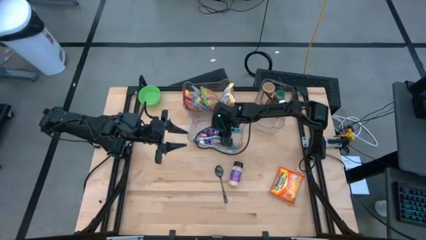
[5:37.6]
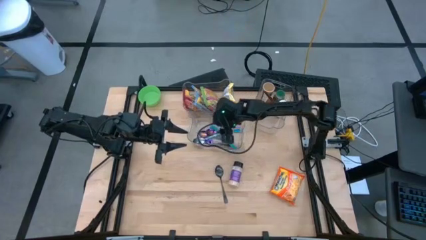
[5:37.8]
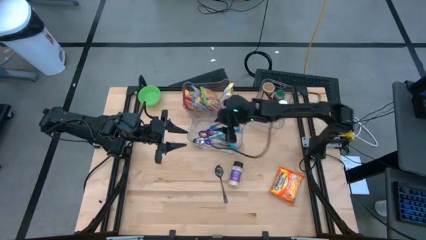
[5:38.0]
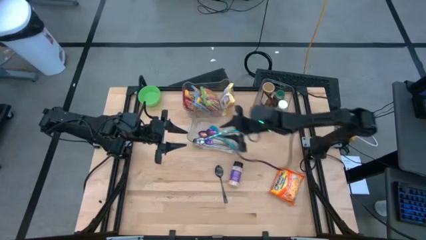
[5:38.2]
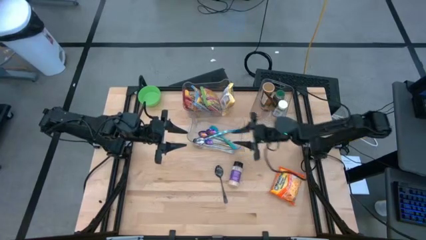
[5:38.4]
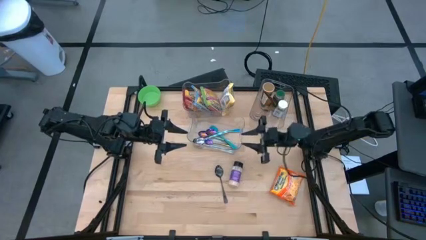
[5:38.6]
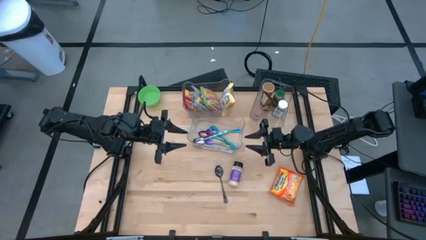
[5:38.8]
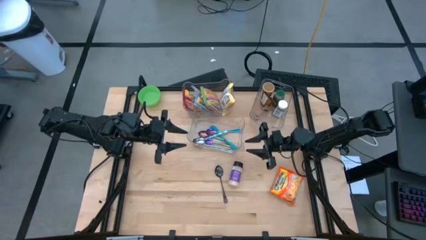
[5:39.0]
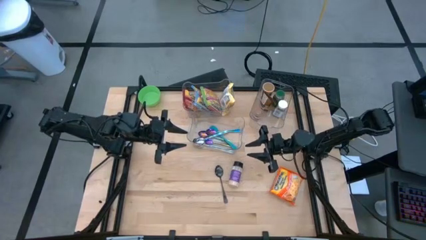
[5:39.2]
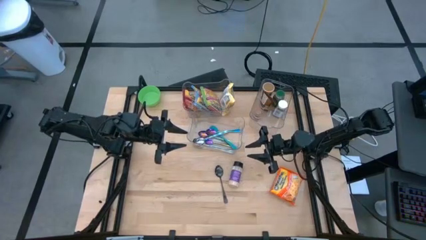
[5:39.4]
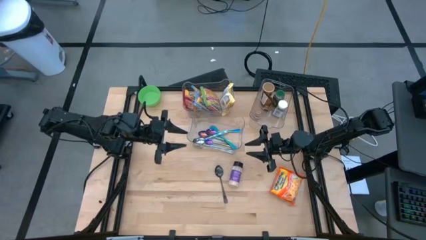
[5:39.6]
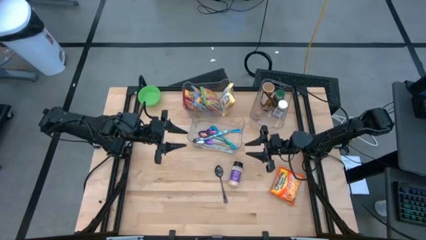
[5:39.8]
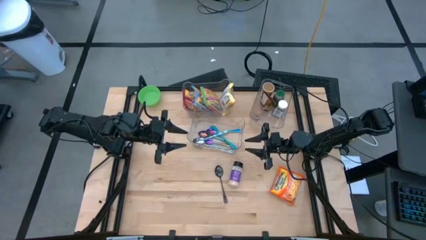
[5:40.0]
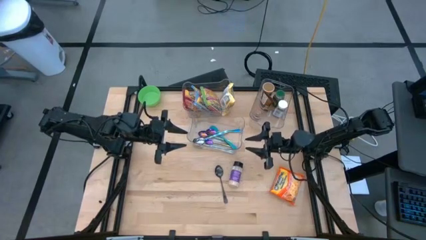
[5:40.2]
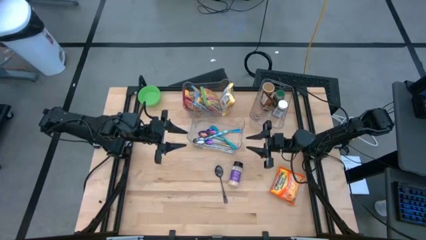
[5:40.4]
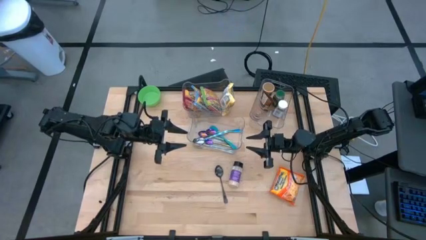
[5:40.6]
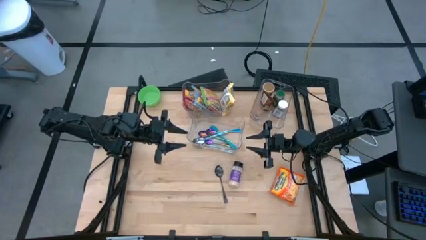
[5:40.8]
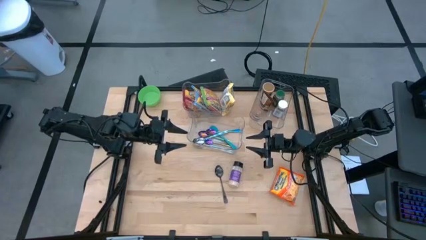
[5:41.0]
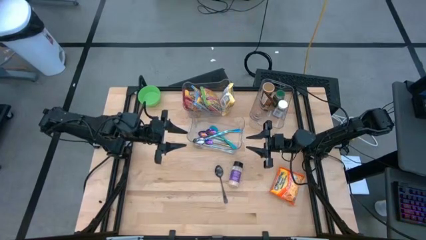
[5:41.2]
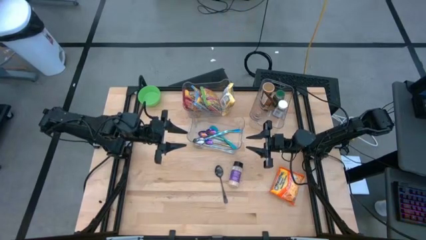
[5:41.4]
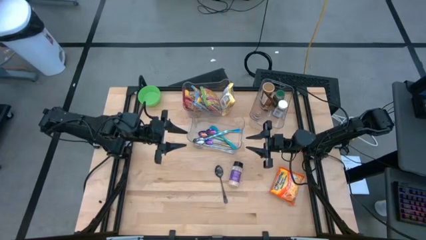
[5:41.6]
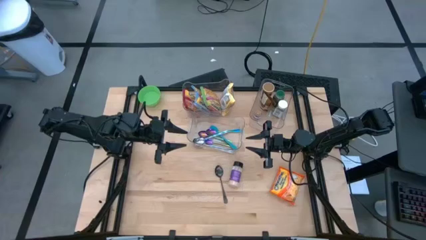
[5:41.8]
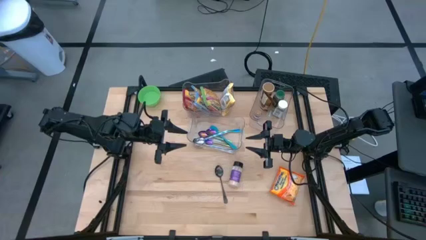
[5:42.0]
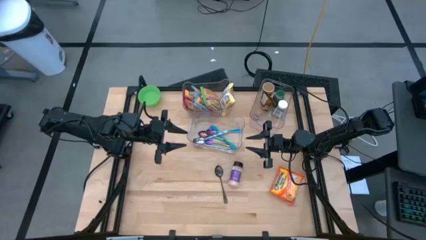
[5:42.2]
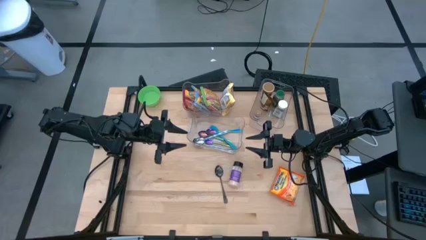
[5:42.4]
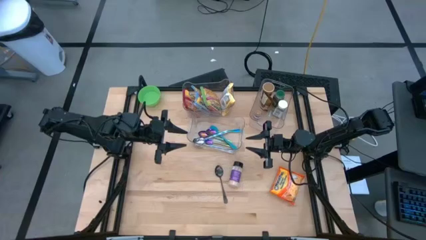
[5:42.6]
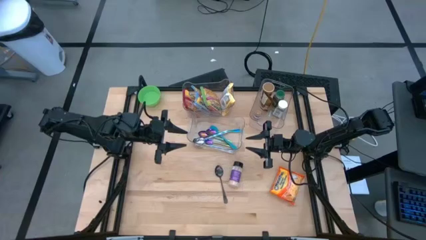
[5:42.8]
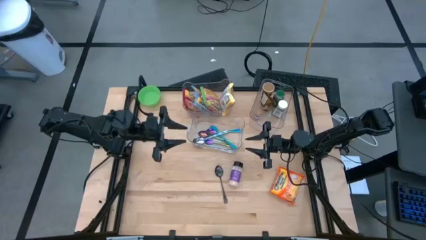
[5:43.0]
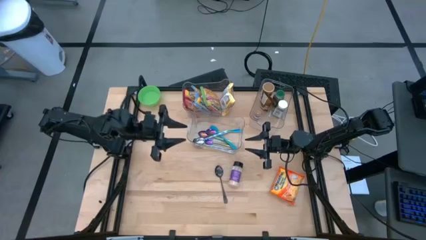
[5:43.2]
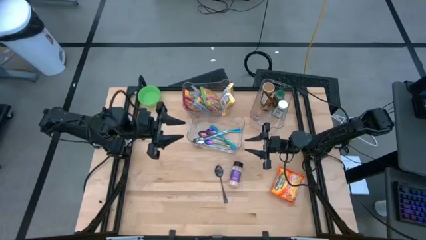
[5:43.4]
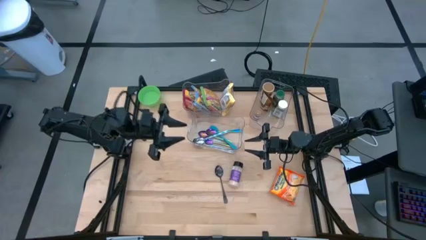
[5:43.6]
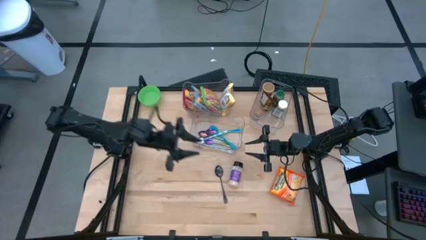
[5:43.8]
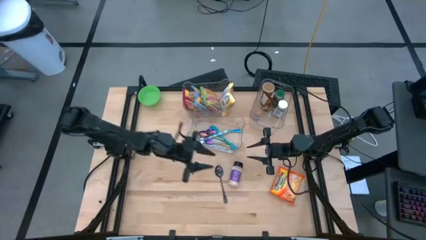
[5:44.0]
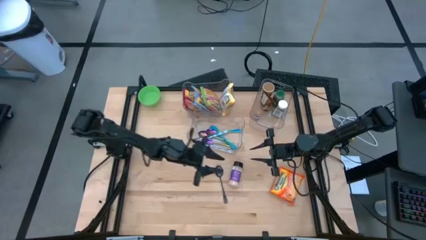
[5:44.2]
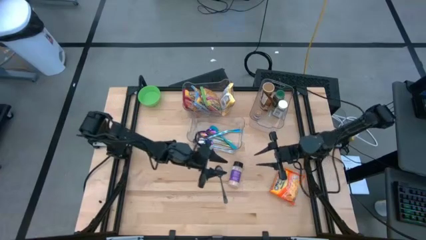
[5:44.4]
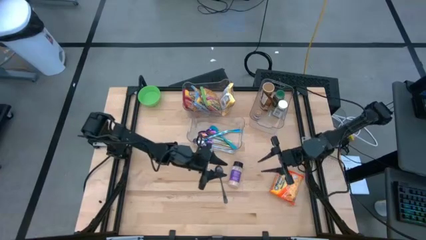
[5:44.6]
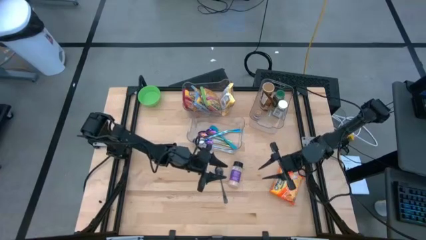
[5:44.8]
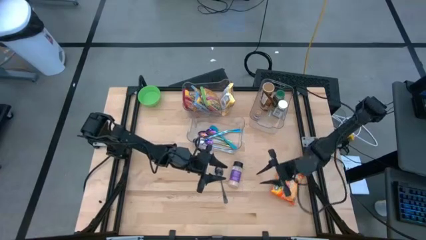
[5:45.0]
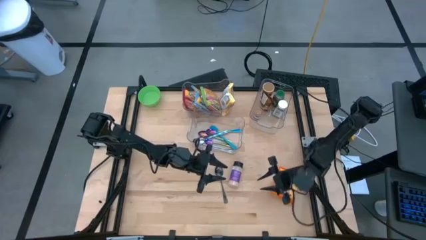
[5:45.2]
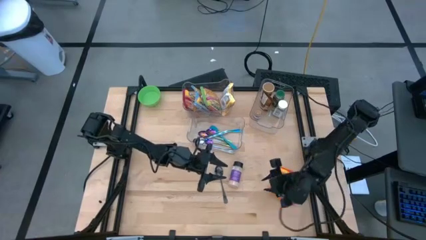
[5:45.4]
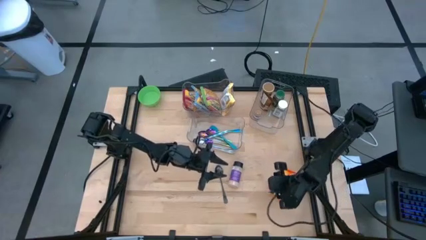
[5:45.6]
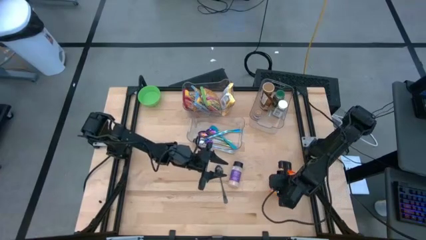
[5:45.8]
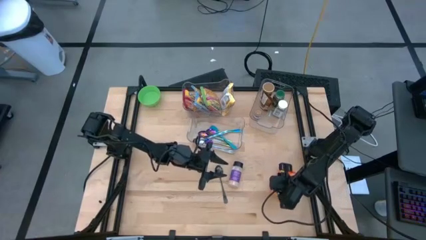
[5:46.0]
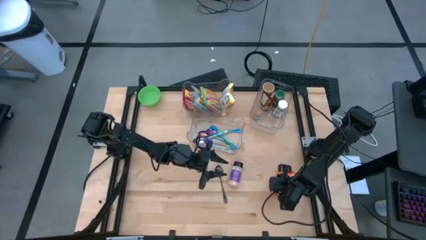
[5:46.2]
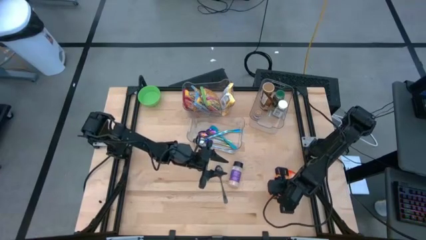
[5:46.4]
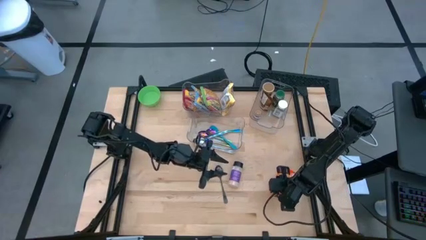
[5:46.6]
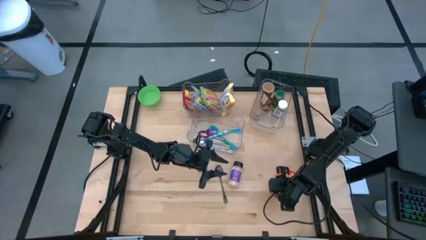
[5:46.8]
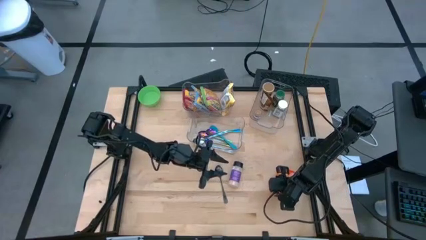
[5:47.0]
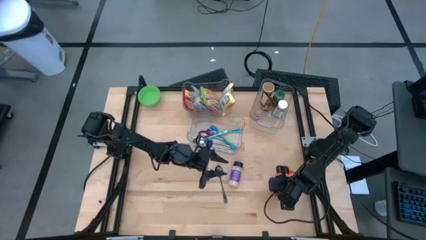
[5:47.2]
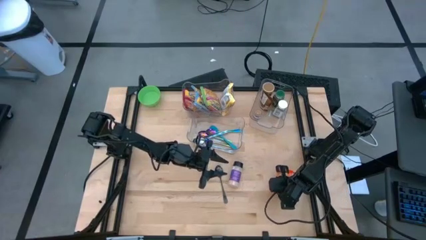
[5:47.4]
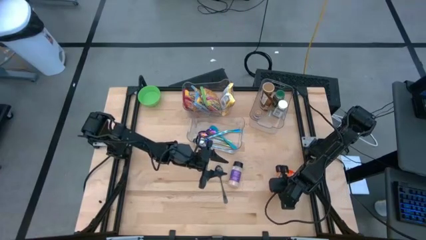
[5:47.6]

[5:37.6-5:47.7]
Task: Pick & Place Food Item
Put the orange noodle pack into the top left transparent bin
